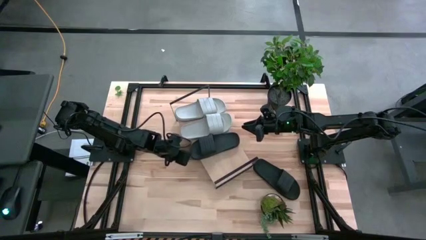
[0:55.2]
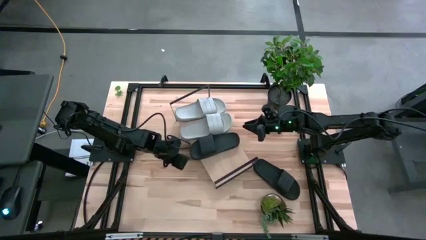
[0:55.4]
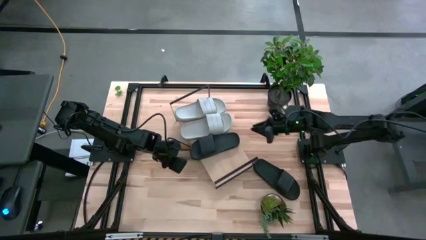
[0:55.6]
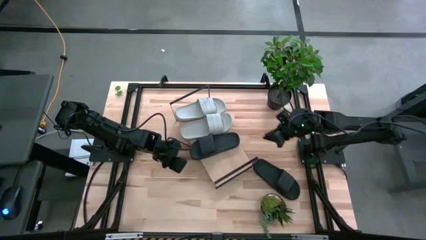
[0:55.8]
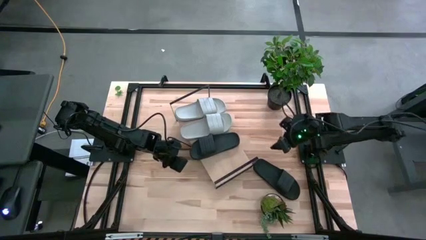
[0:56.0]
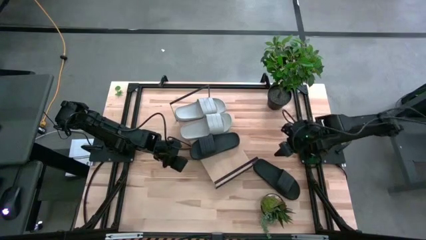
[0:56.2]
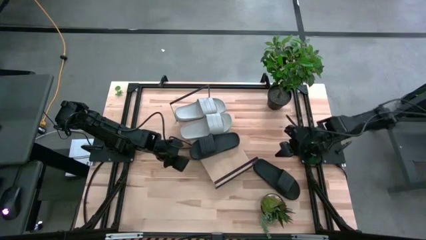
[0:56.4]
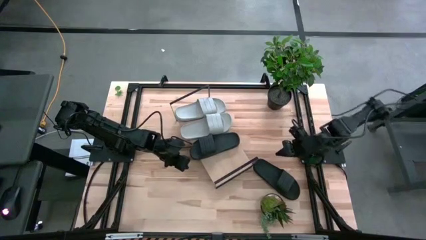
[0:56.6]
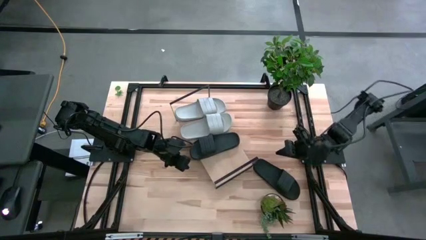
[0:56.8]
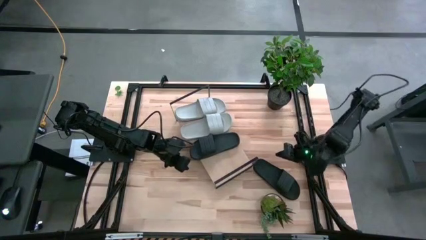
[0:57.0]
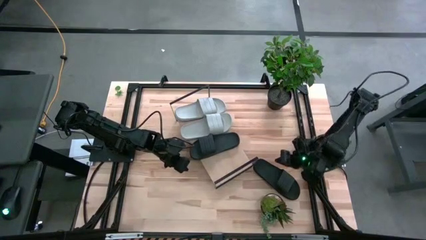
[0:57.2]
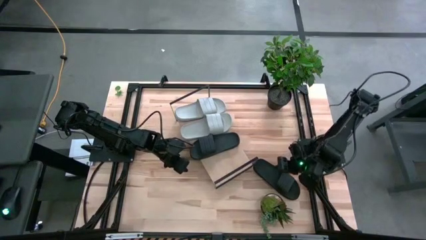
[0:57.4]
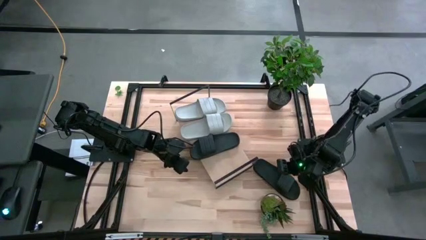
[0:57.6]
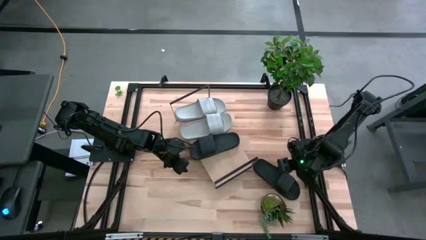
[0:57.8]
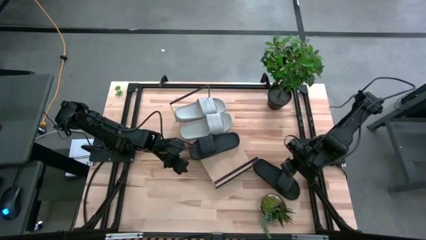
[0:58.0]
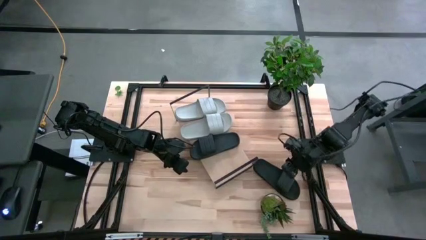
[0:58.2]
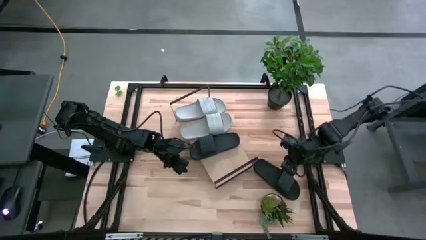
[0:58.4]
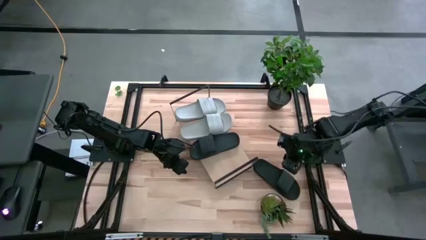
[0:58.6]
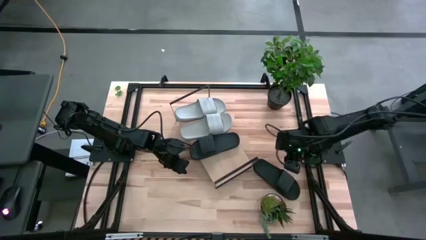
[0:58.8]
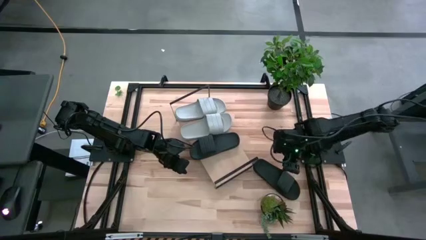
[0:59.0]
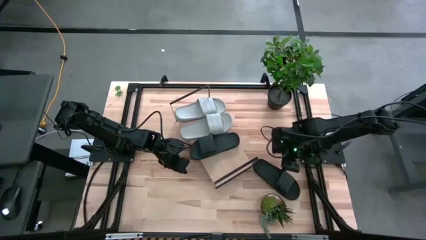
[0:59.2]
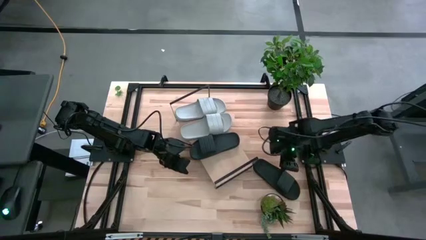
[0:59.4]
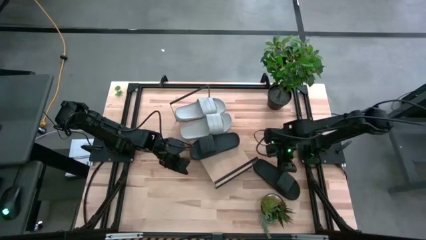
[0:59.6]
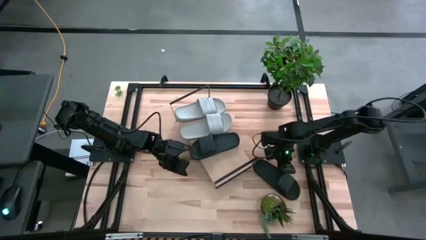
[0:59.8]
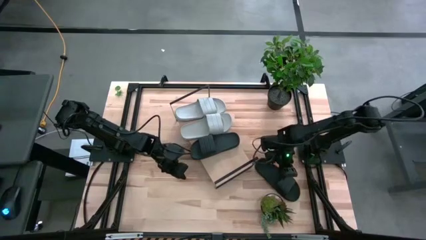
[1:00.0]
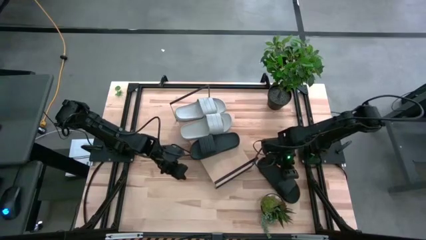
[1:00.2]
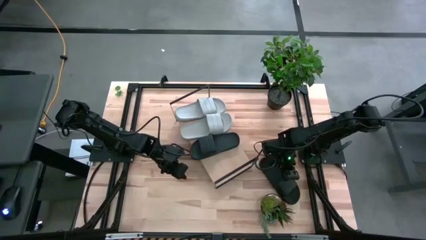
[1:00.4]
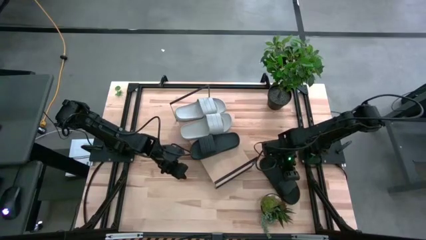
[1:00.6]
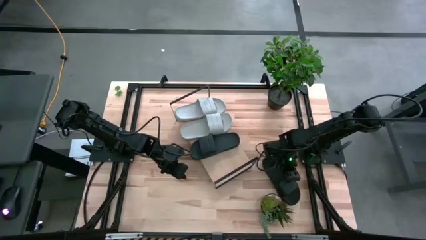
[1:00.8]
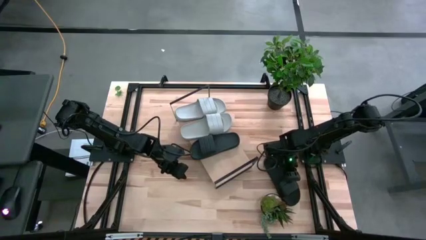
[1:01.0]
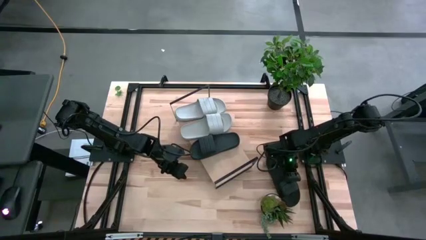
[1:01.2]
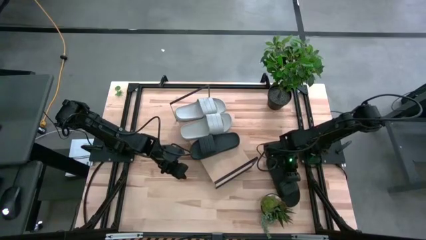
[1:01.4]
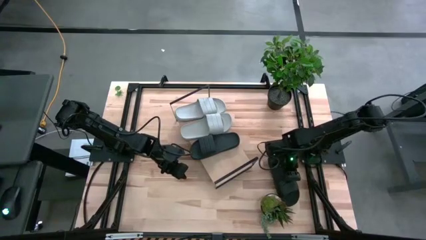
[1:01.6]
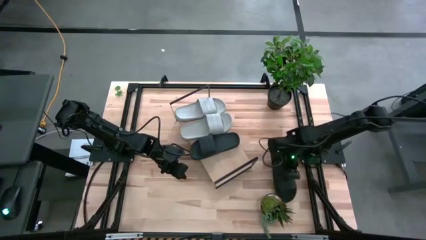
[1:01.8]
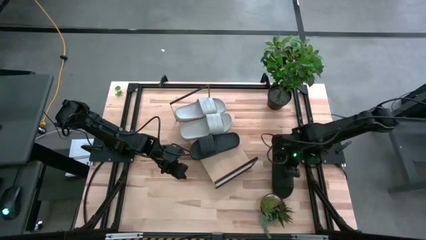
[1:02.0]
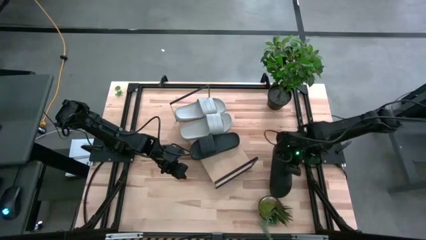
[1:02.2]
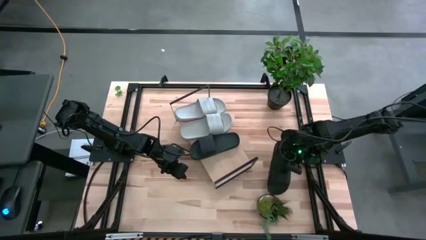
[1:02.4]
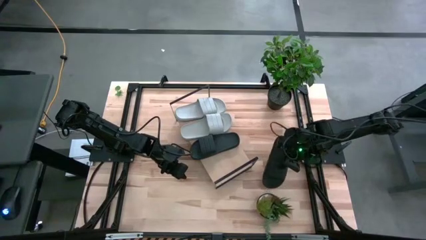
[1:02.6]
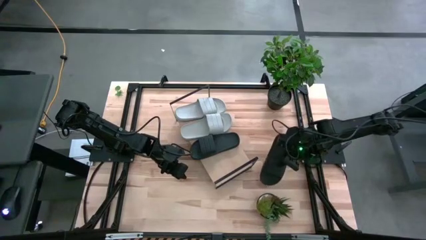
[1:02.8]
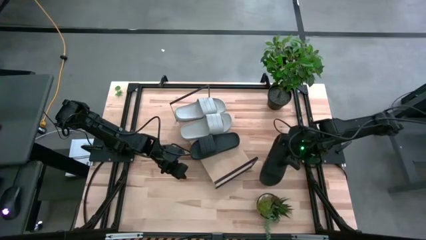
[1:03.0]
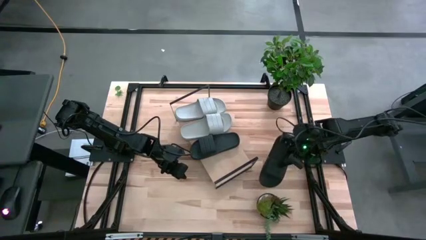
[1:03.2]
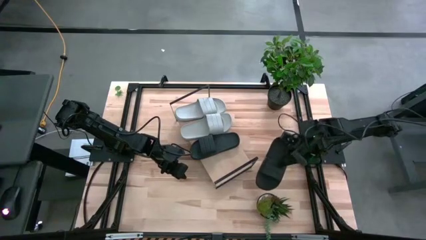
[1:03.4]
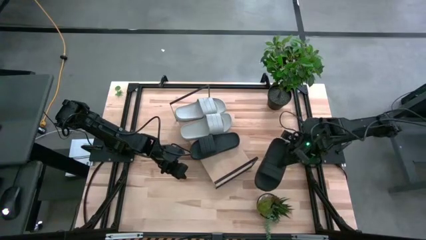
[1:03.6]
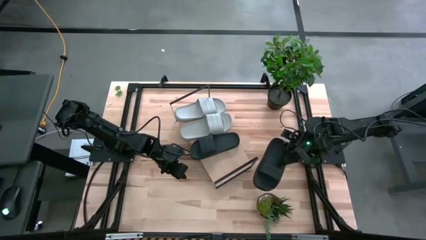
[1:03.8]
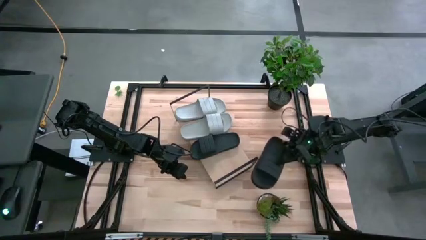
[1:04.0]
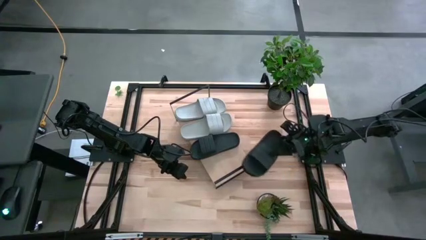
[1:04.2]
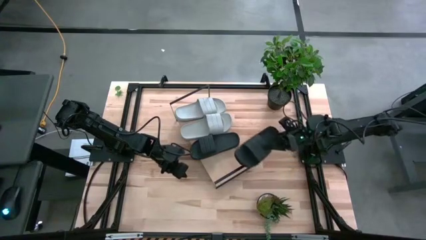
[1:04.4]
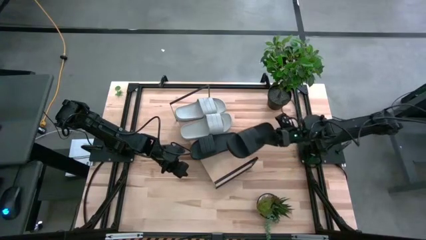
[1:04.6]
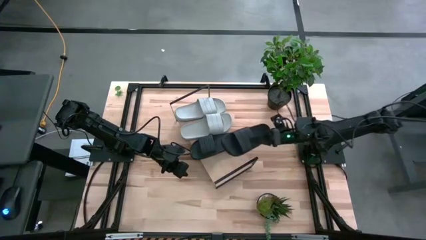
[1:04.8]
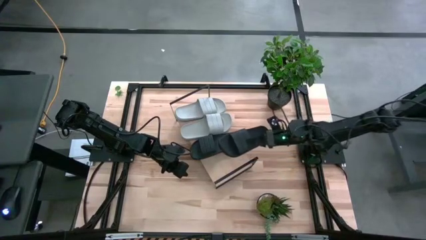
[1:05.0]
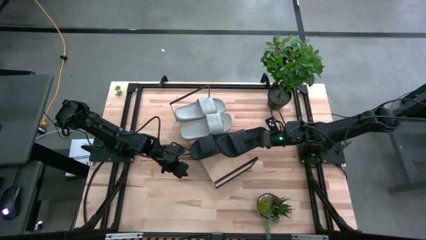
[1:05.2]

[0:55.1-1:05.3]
Task: Pick and place slides into the shelf
Put the black slipper on the shelf

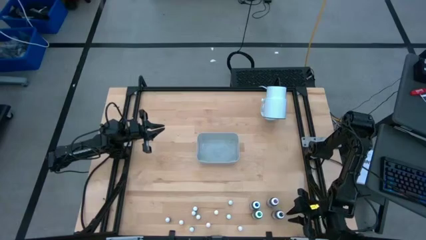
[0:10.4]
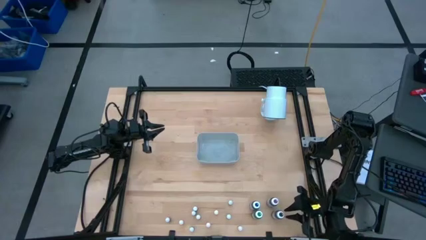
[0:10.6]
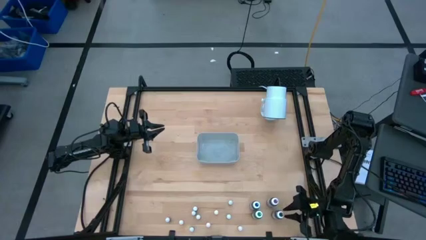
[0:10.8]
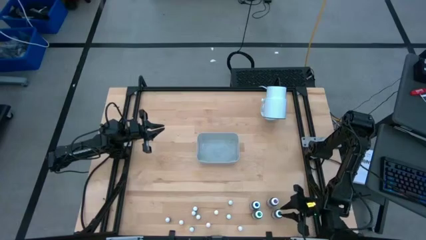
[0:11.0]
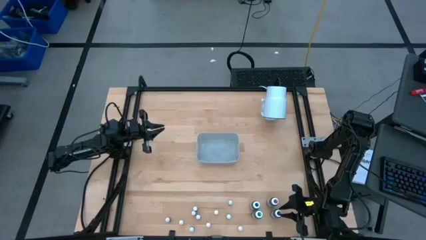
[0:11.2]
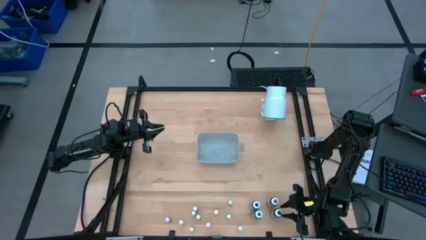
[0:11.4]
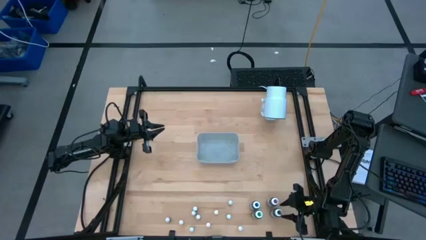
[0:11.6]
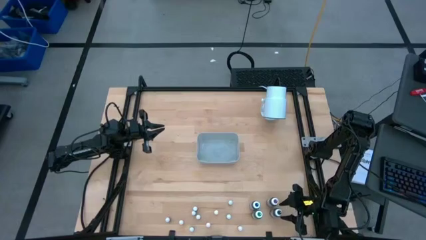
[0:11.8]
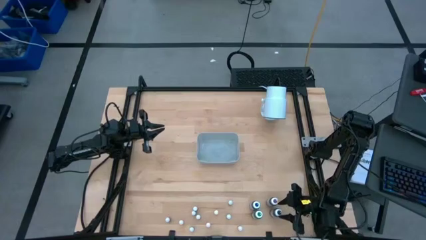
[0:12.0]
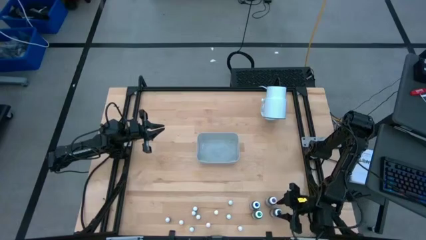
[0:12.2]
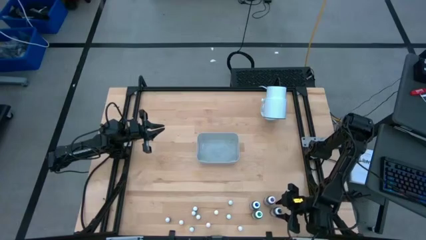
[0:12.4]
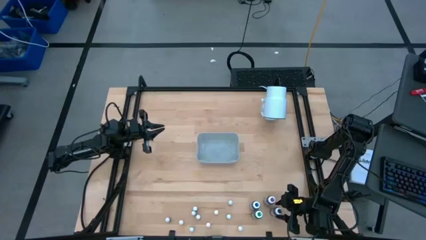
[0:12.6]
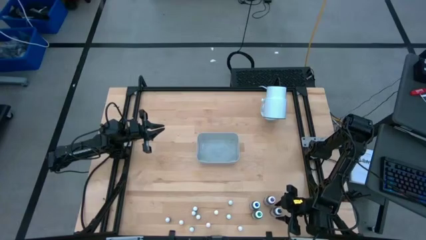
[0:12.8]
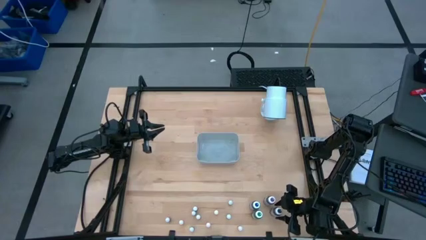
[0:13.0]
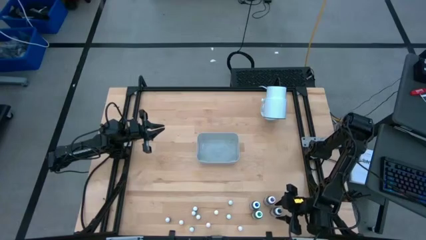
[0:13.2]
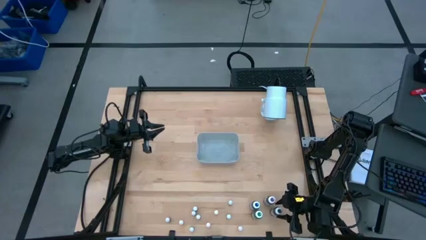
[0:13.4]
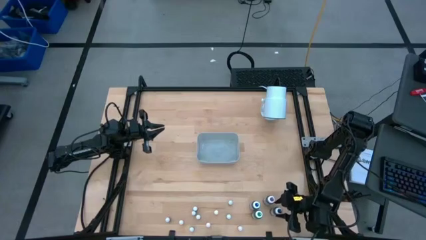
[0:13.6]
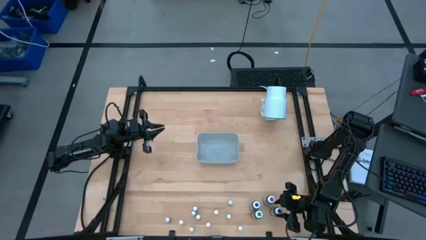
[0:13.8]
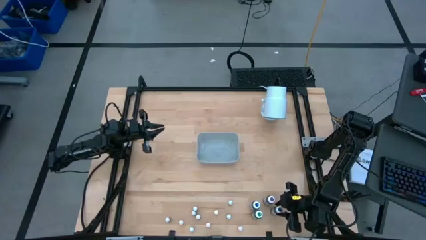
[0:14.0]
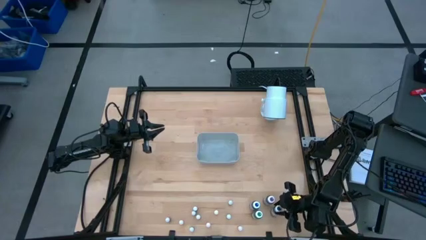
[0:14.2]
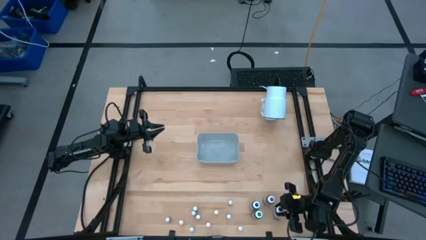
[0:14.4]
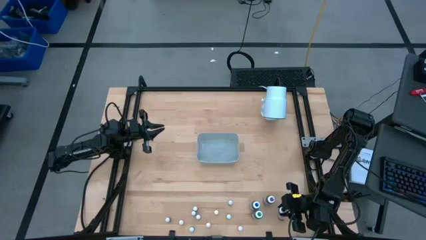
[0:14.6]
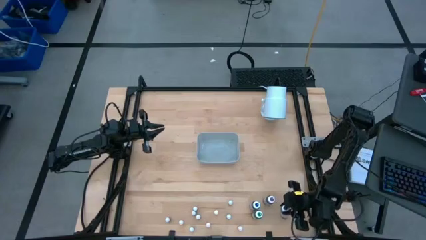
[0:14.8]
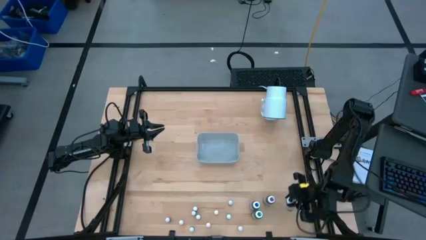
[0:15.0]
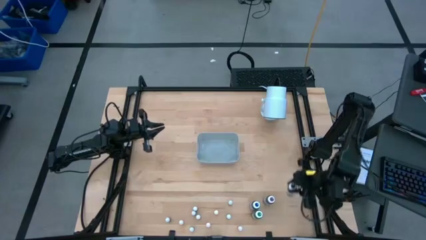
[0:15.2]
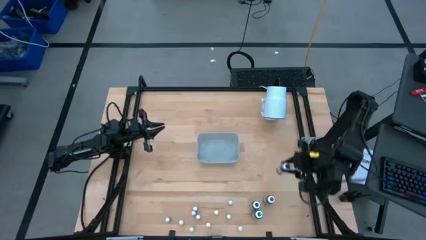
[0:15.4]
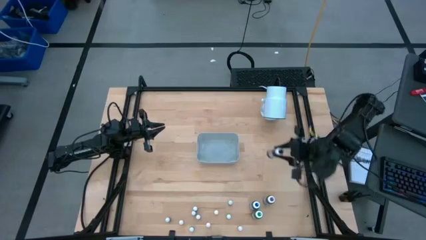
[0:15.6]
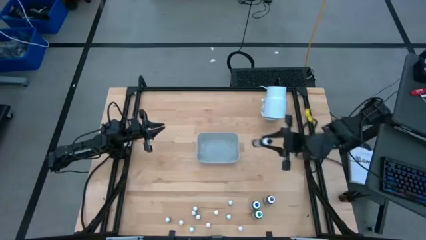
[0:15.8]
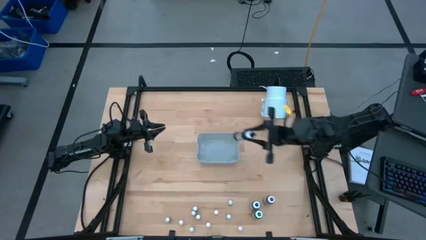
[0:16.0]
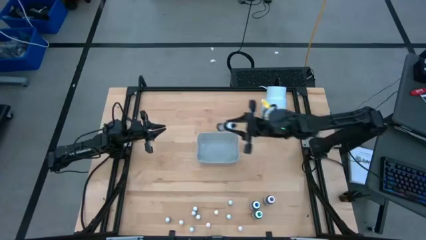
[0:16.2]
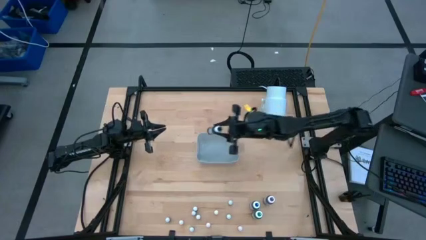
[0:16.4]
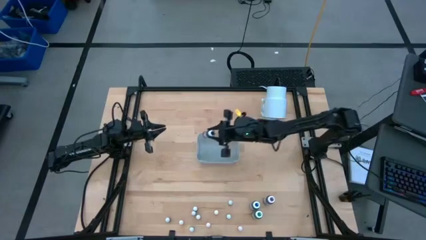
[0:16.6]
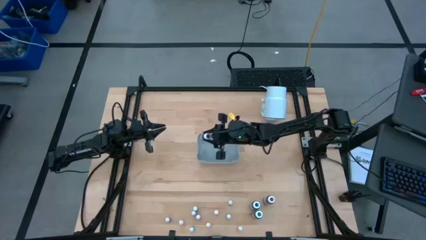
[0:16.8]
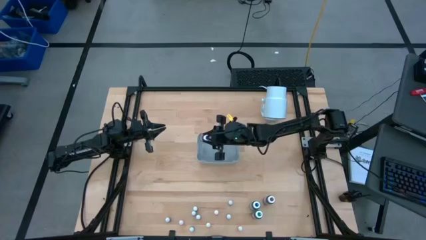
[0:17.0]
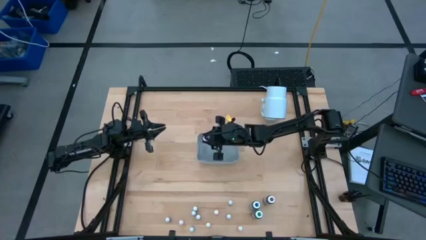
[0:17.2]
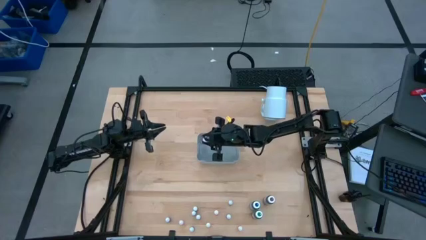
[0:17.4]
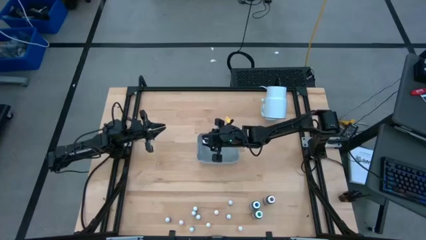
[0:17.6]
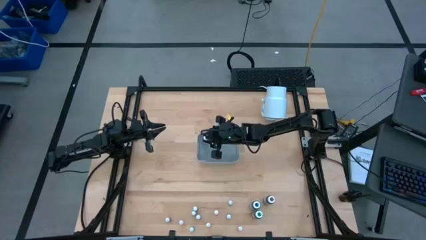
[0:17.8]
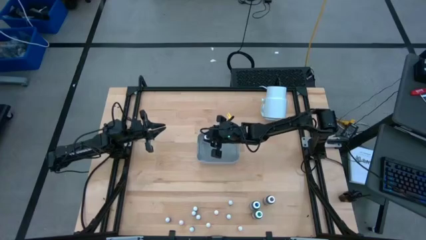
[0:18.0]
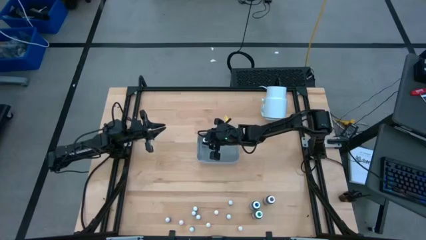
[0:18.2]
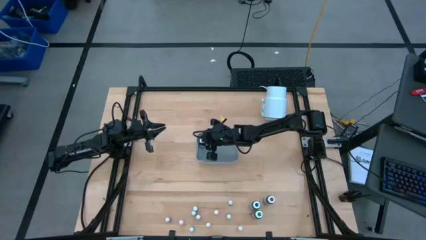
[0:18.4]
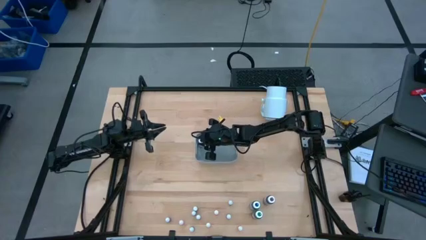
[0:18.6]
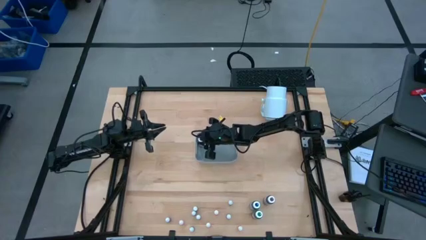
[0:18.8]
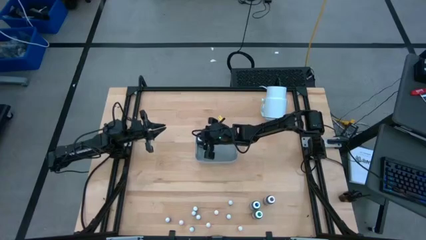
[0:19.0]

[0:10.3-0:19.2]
Task: Pick & Place food coloring
Put the large black food coloring bottle into the white bin
